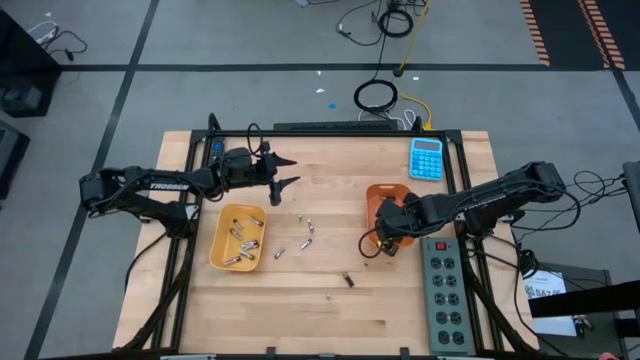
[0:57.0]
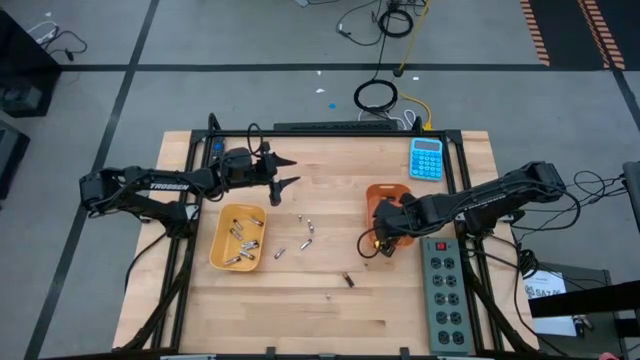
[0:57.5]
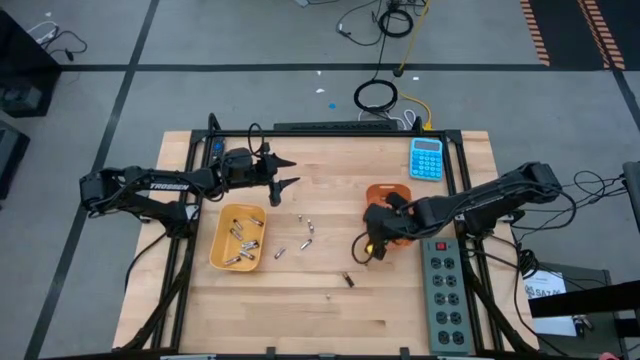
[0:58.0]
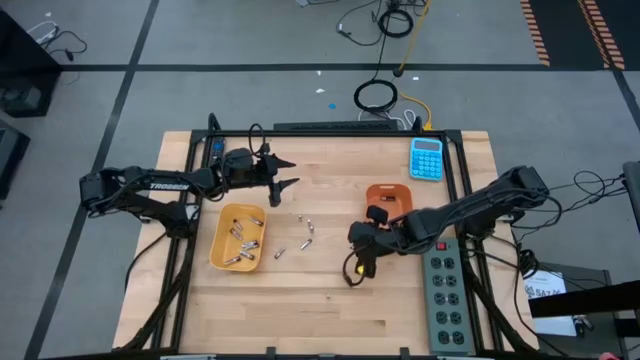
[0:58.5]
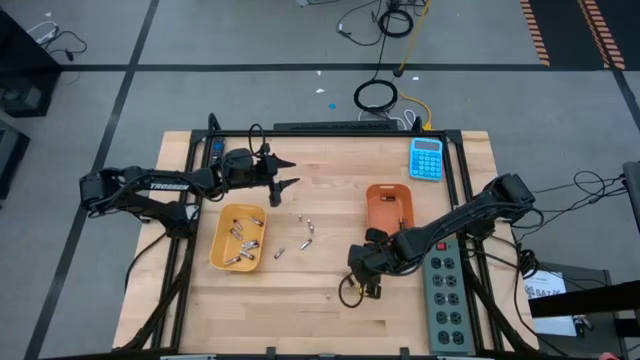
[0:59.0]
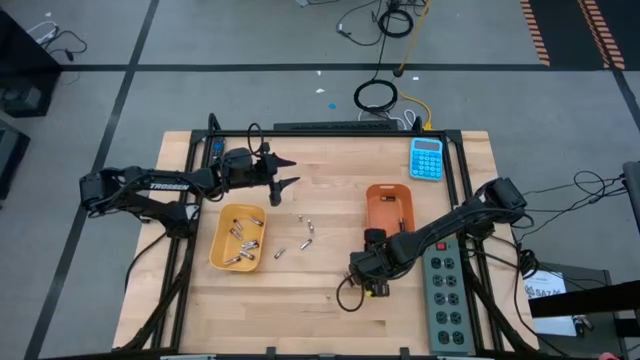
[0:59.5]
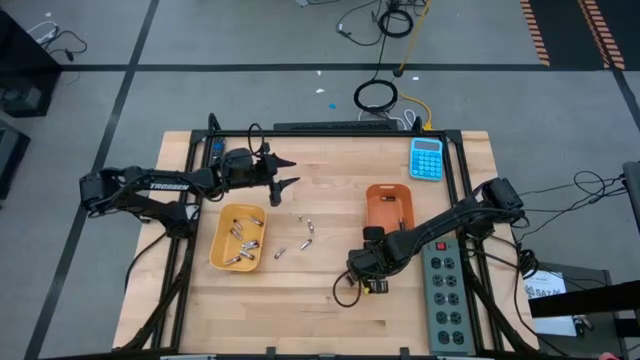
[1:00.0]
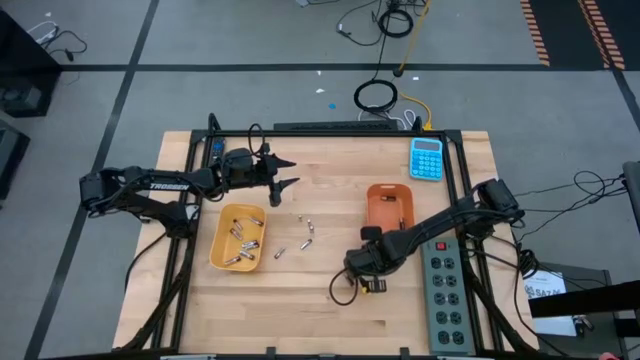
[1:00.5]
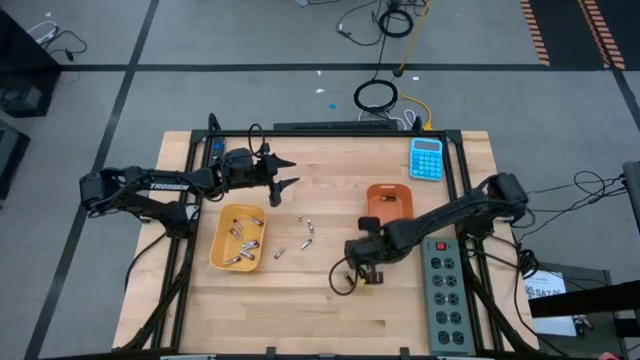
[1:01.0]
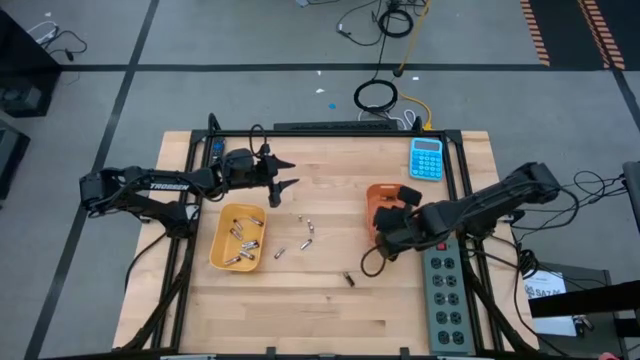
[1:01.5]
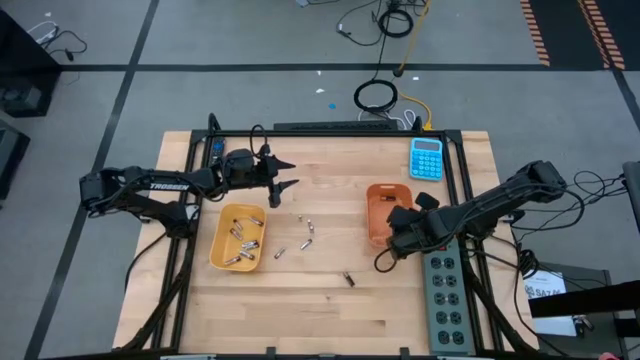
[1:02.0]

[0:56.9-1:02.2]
Task: Sort batteries
Put the black-brown battery into the orange bin

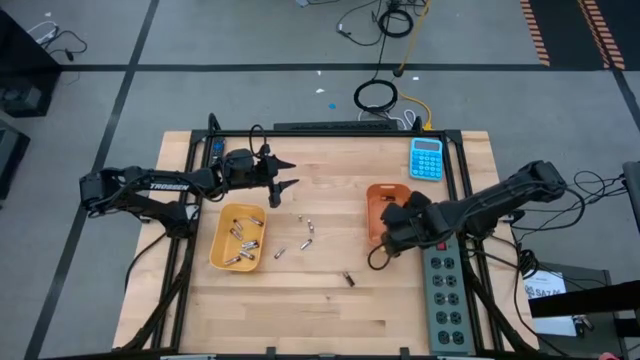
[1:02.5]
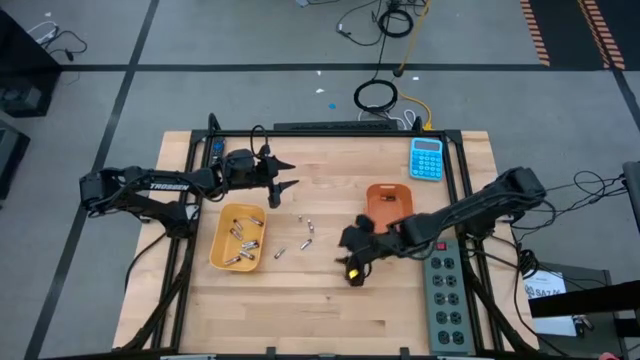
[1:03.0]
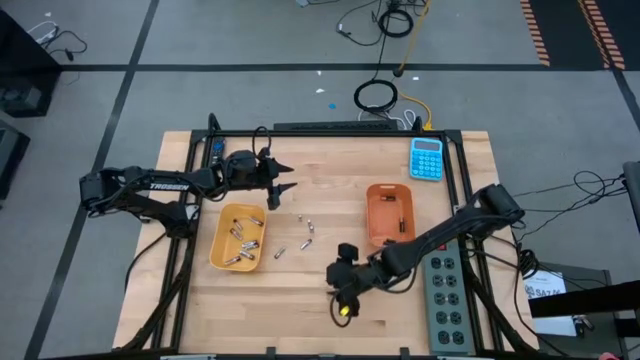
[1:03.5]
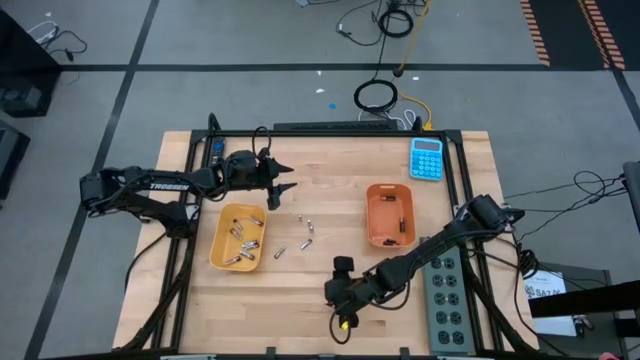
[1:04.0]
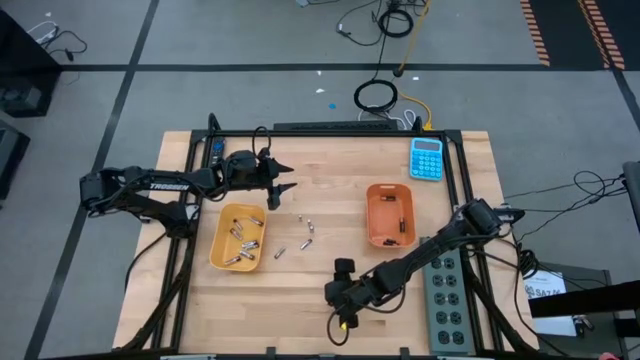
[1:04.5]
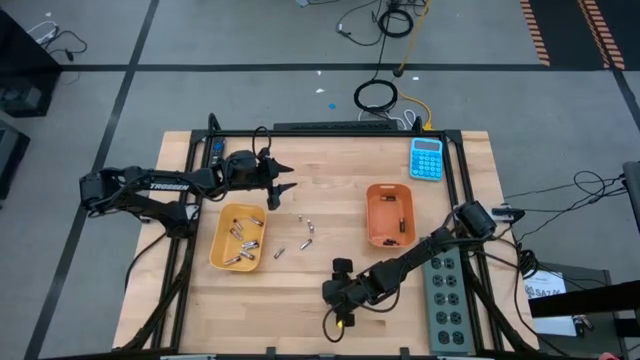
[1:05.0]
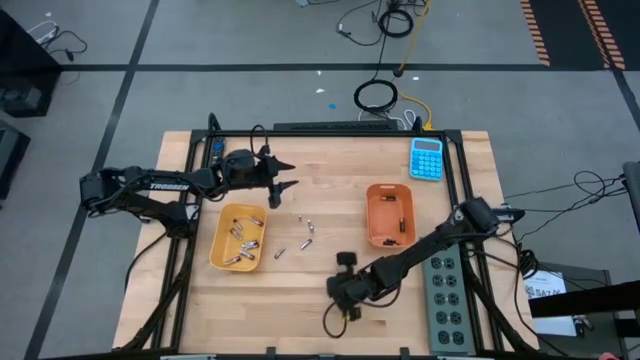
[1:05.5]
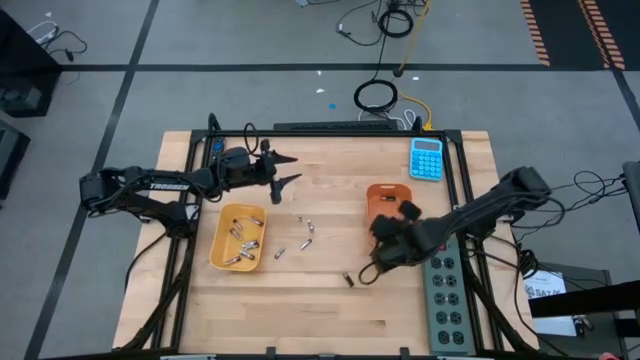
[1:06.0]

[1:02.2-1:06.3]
Put the black-brown battery into the orange bin

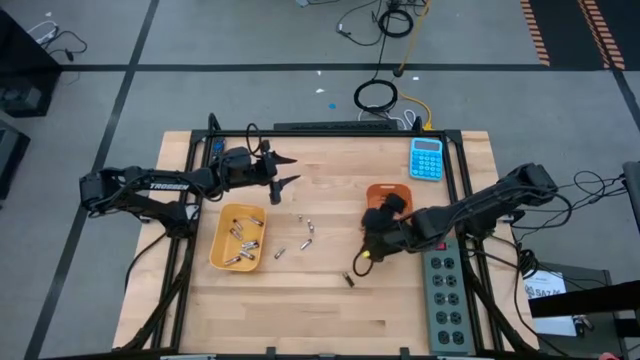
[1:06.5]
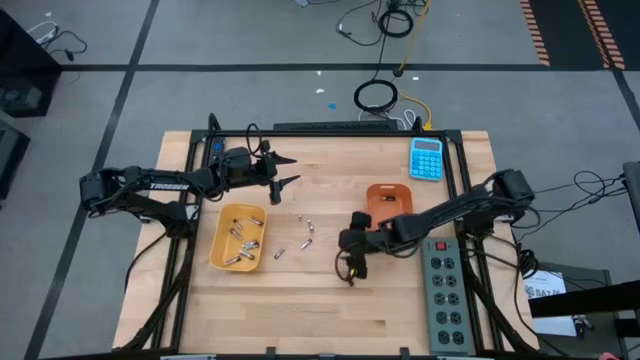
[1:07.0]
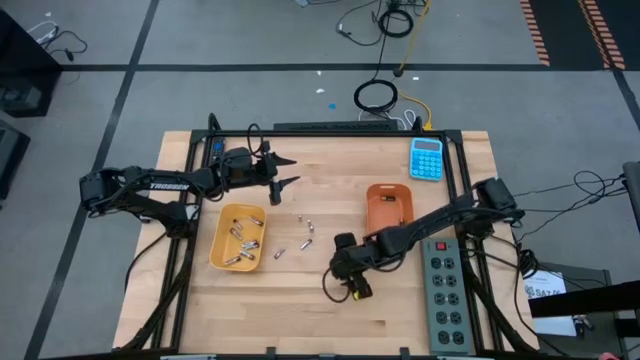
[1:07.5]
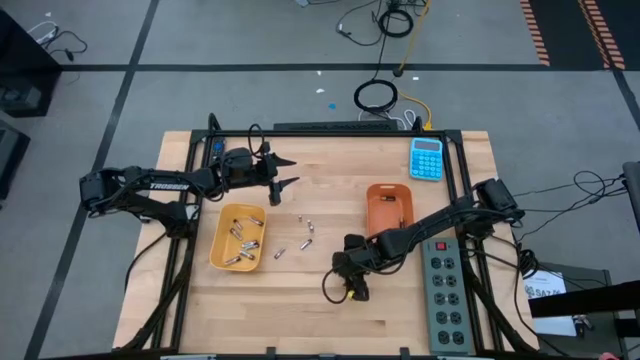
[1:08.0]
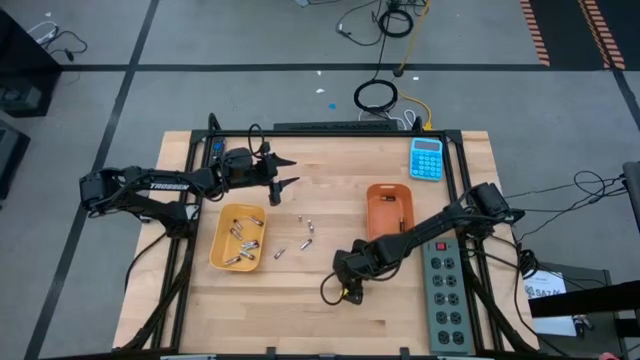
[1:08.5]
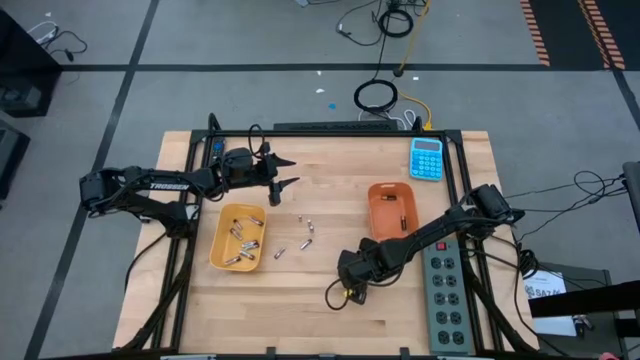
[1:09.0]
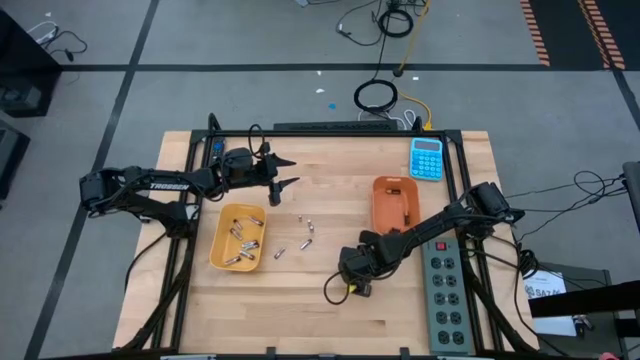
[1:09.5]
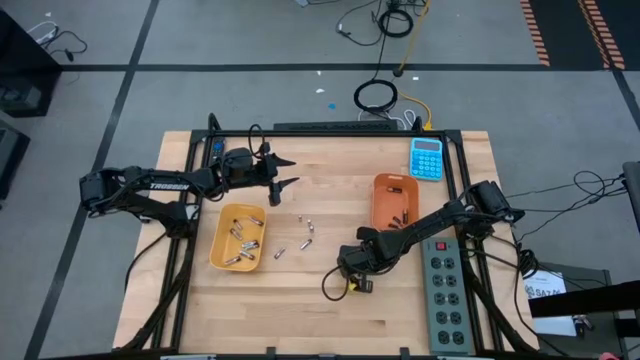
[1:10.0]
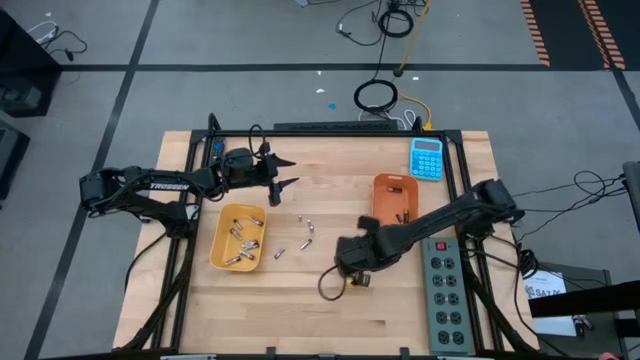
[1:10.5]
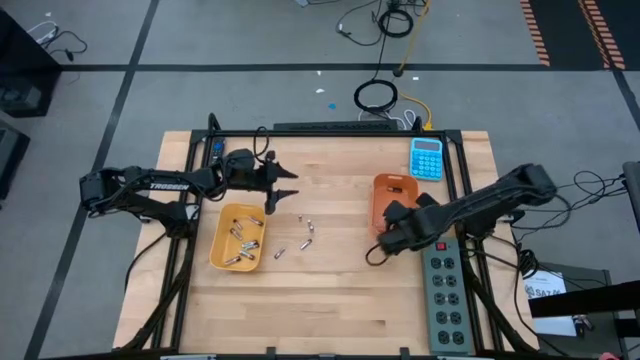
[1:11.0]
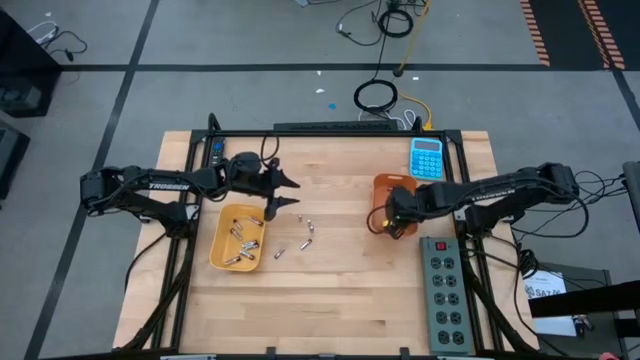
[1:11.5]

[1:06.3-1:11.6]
Put the black-brown battery into the orange bin

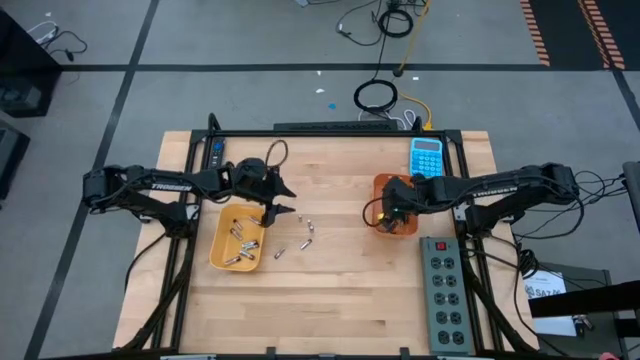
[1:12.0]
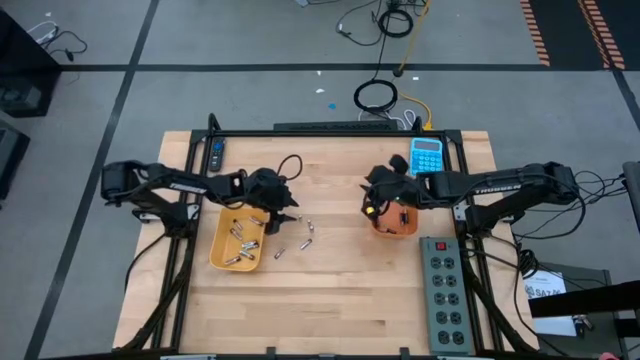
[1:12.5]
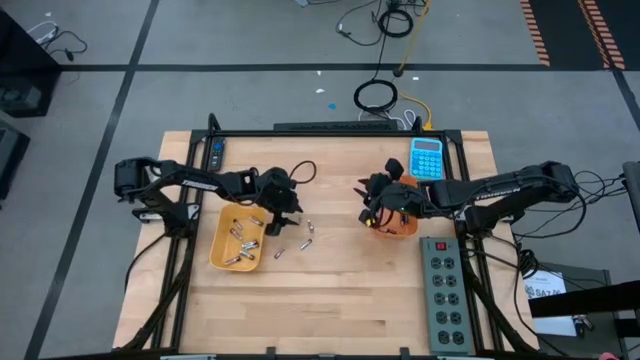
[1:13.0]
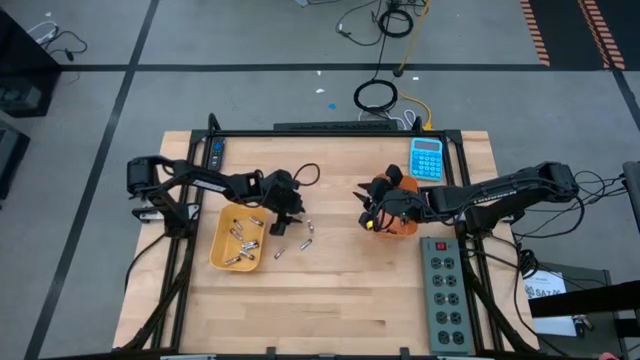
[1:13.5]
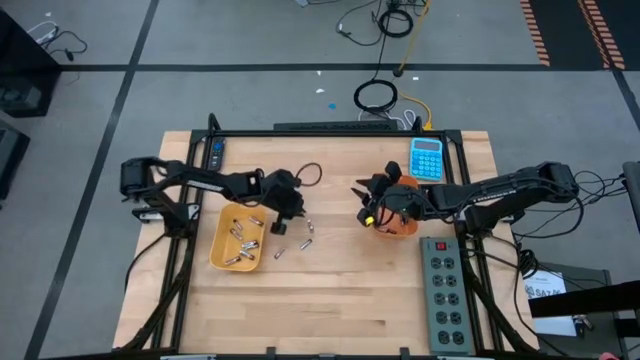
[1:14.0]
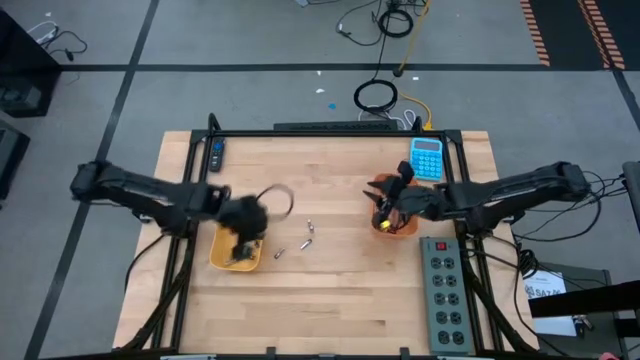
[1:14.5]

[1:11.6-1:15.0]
Put the silver battery into the yellow bin

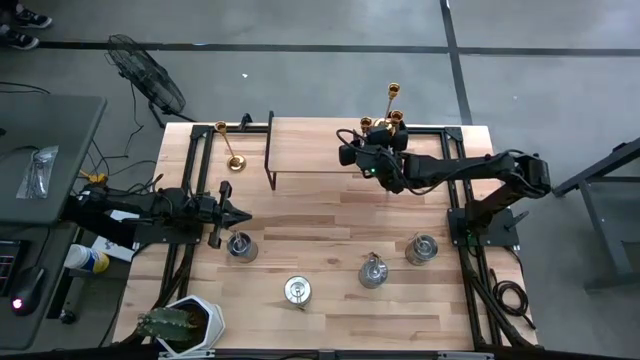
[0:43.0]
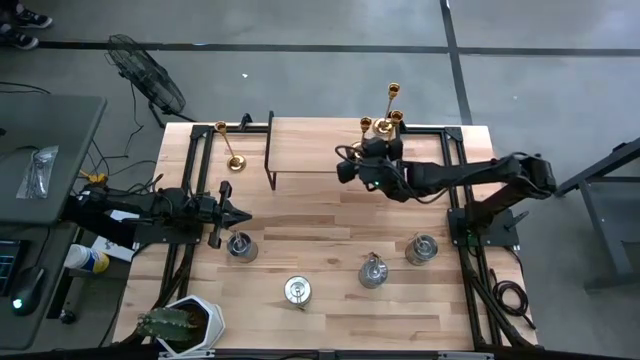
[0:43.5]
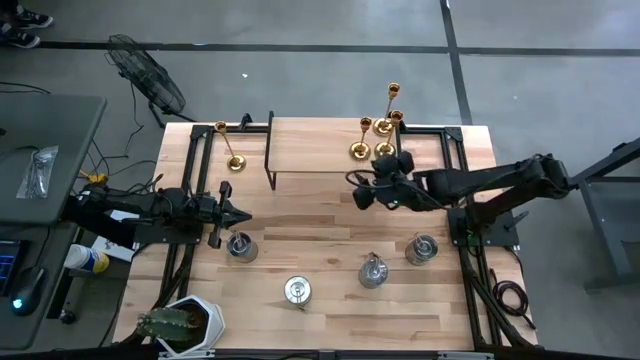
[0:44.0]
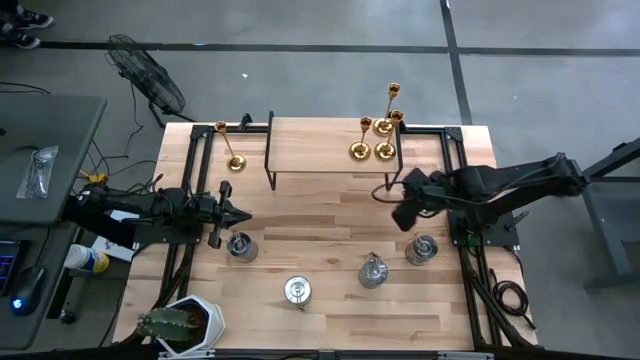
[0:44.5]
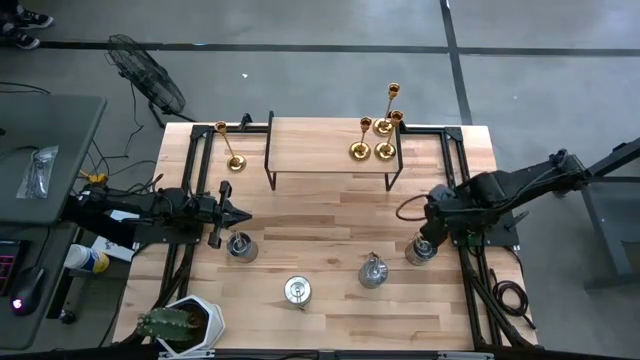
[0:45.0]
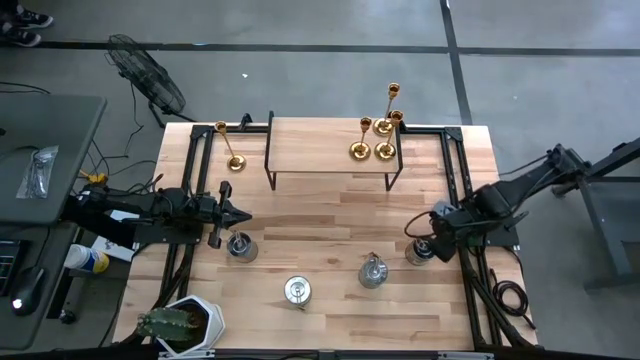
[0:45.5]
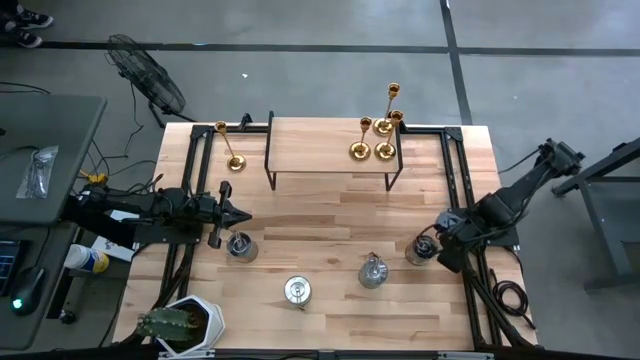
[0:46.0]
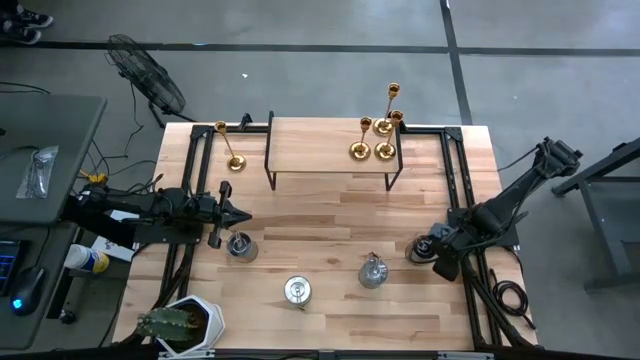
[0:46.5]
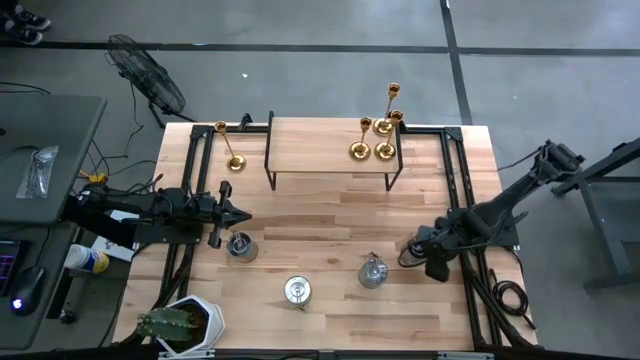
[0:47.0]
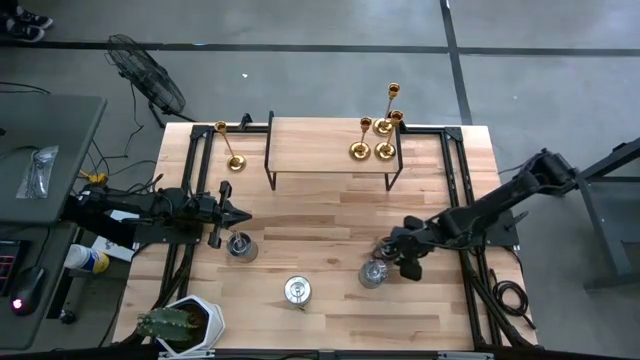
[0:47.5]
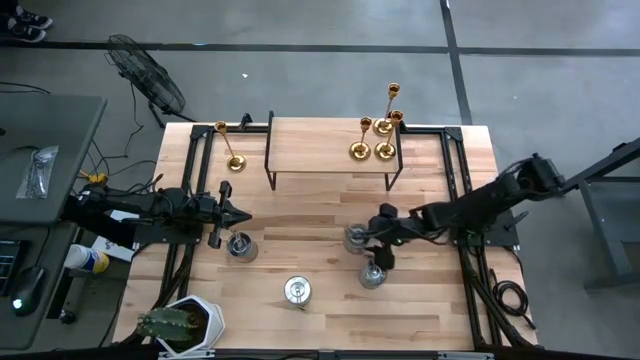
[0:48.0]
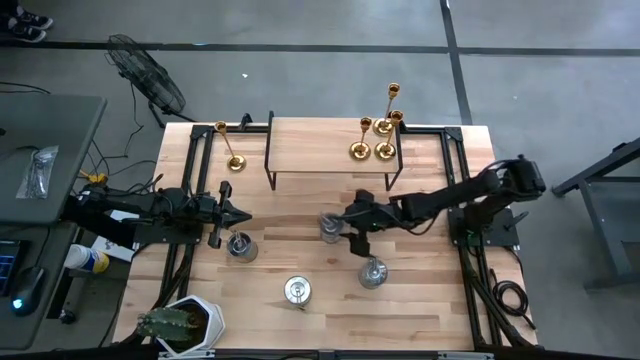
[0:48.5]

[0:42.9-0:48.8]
Task: Pick & Place candle stick holders
Move the top brown scented candle to the center of the table
